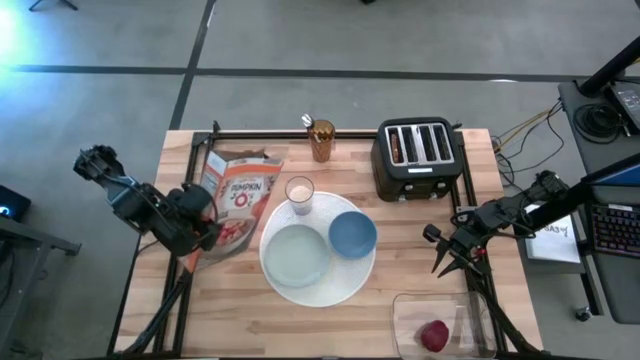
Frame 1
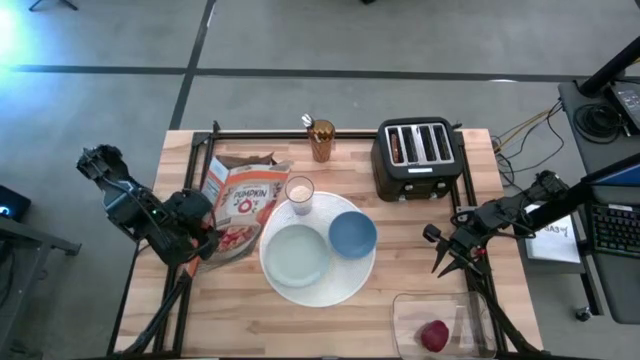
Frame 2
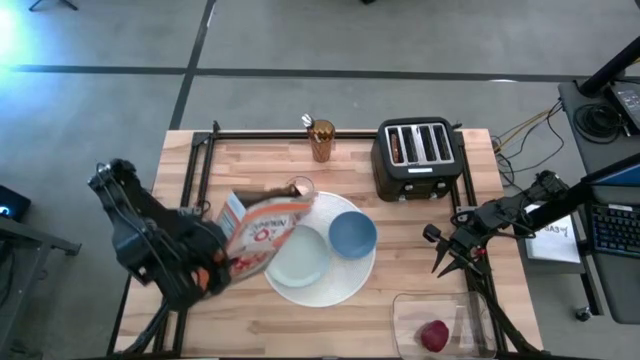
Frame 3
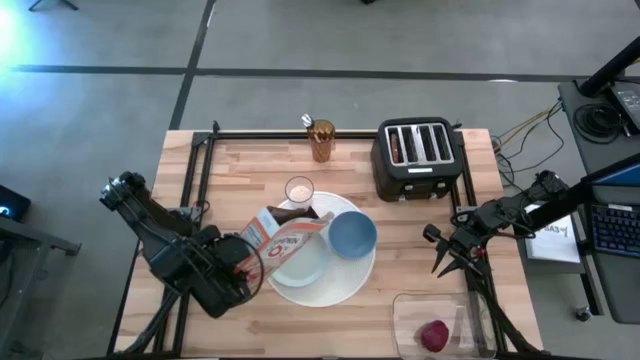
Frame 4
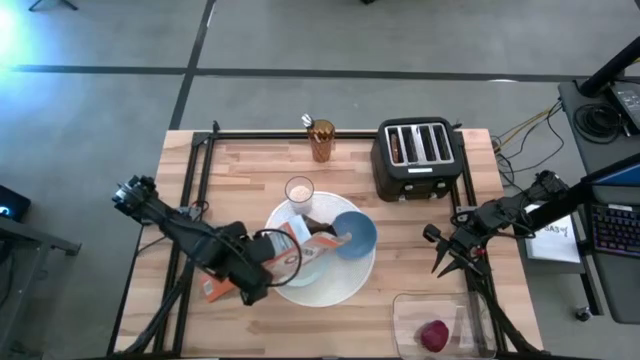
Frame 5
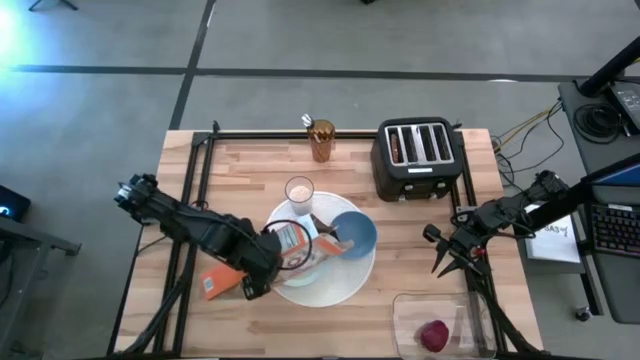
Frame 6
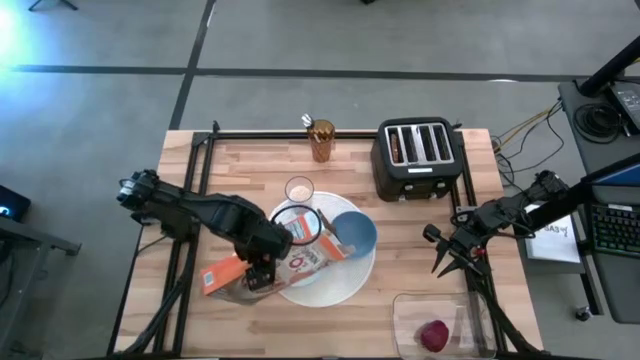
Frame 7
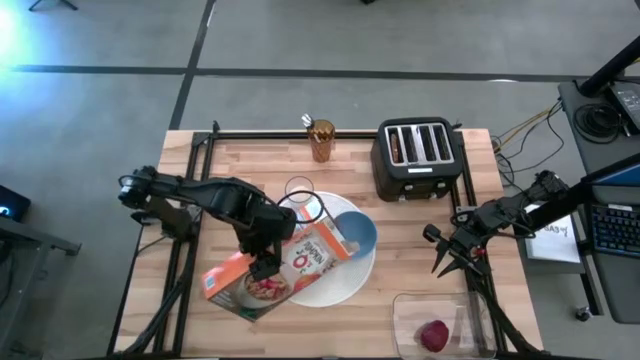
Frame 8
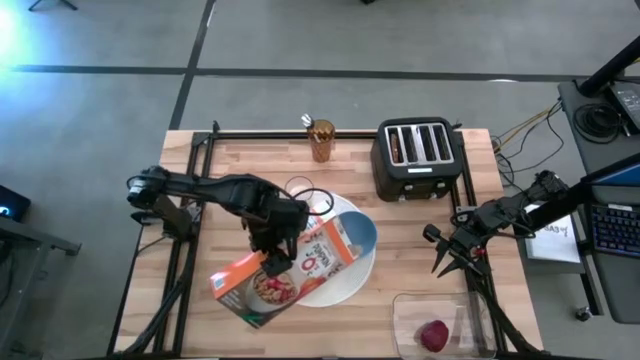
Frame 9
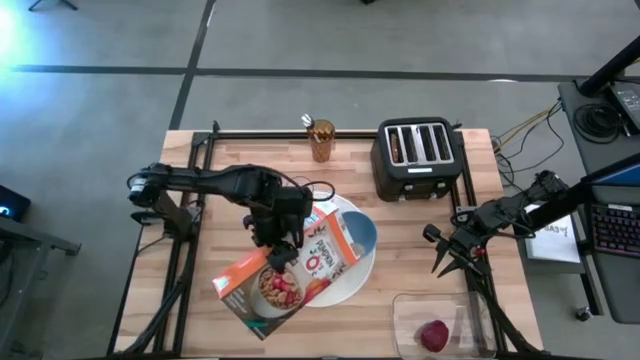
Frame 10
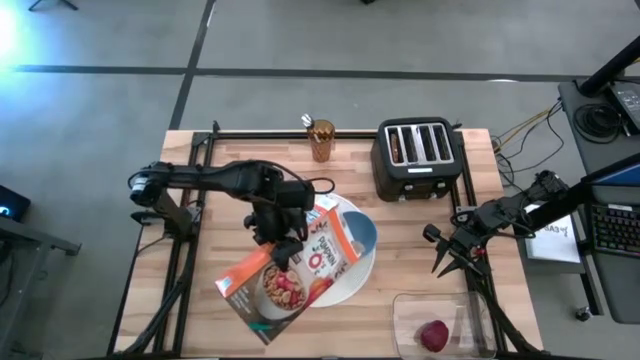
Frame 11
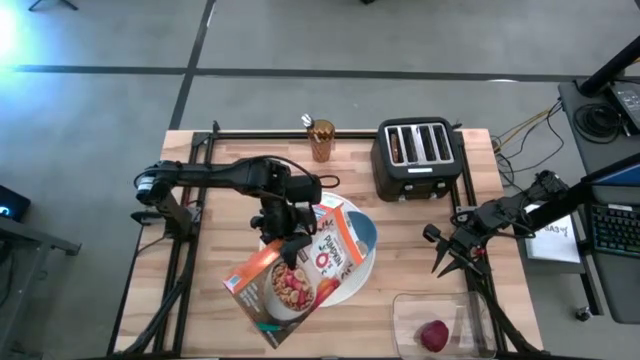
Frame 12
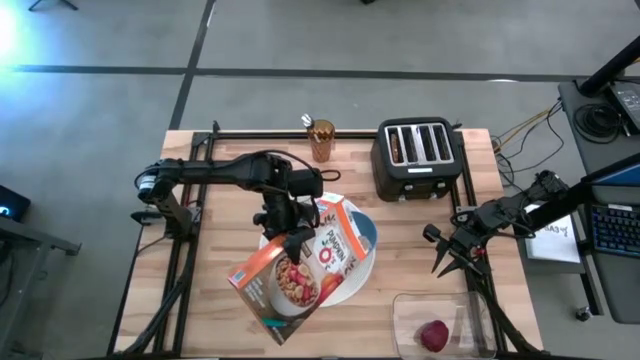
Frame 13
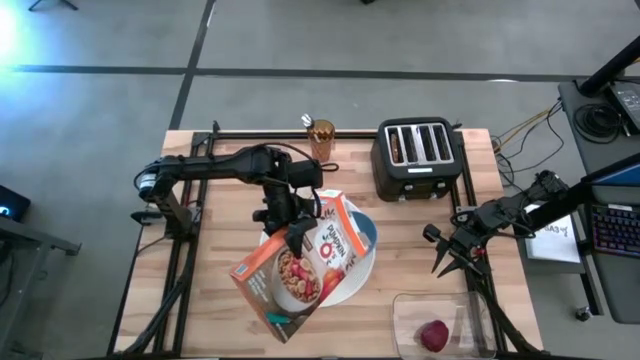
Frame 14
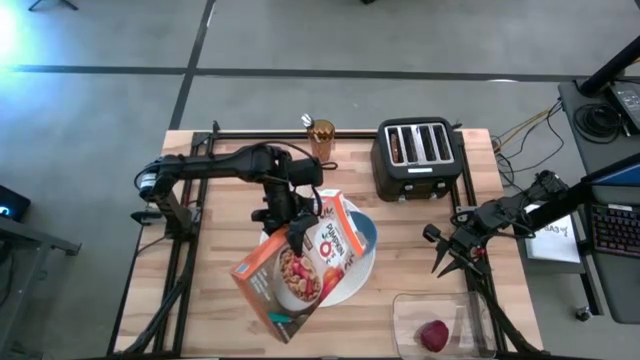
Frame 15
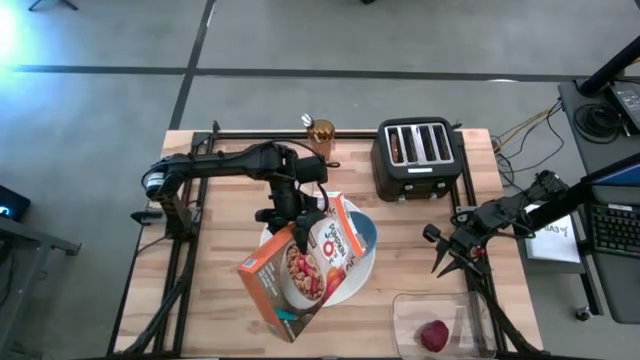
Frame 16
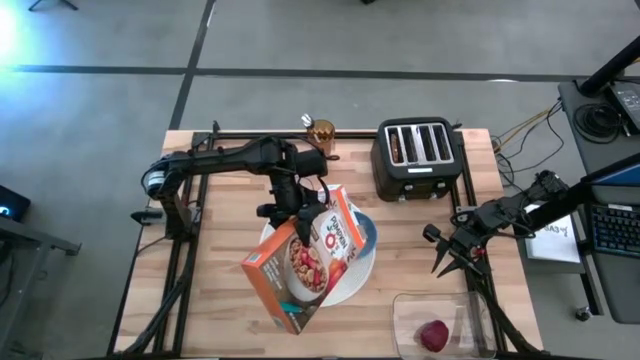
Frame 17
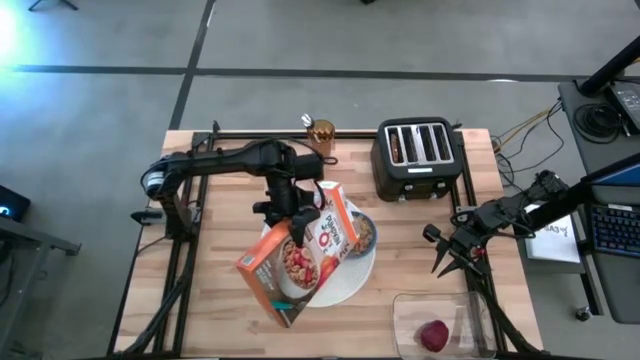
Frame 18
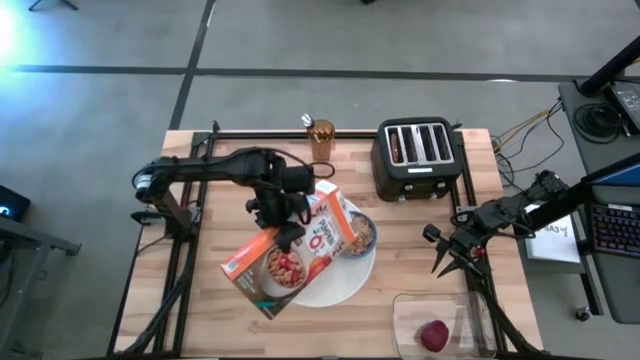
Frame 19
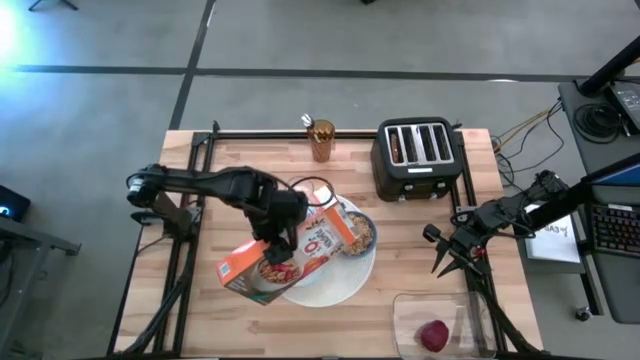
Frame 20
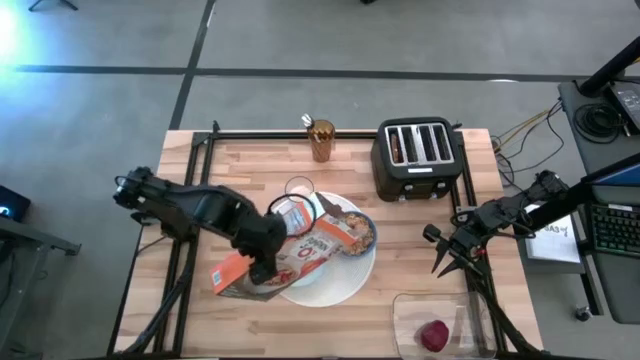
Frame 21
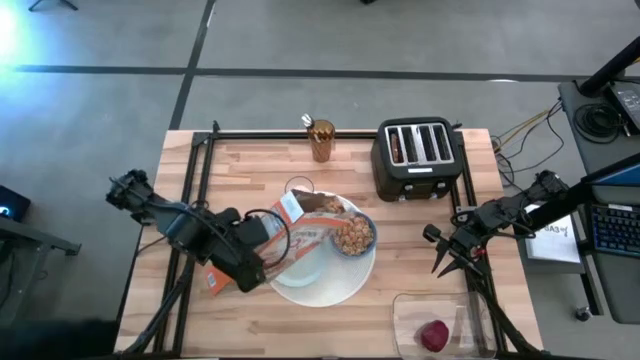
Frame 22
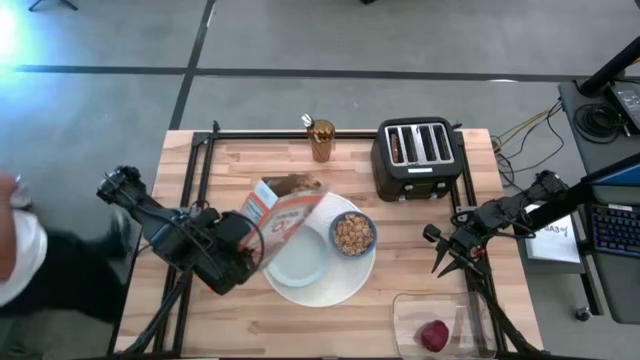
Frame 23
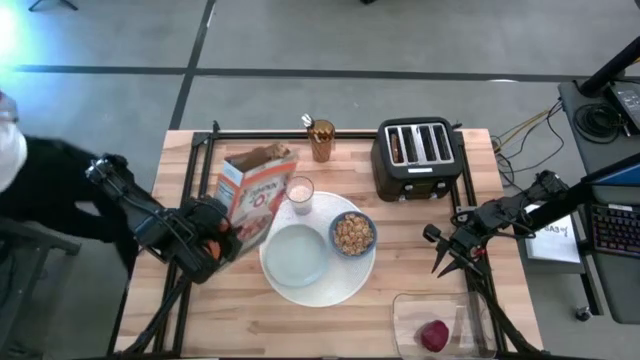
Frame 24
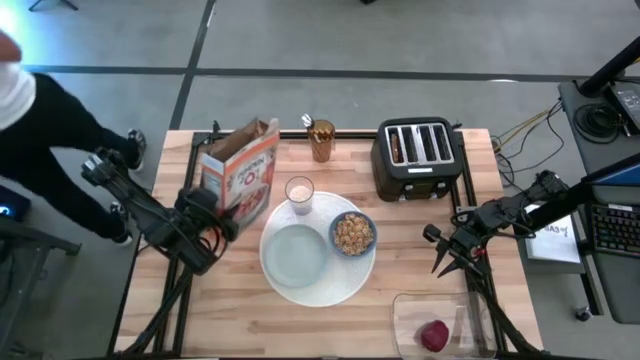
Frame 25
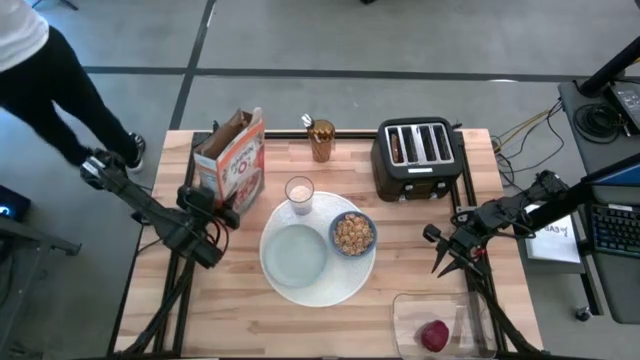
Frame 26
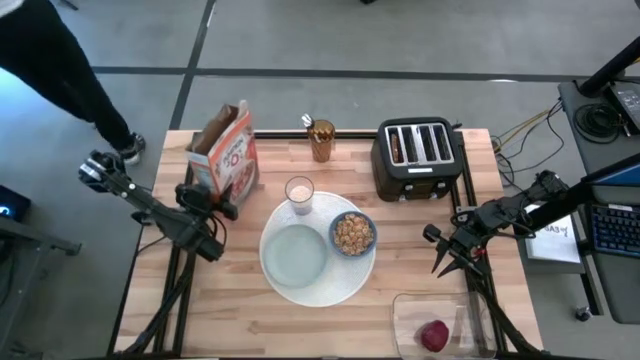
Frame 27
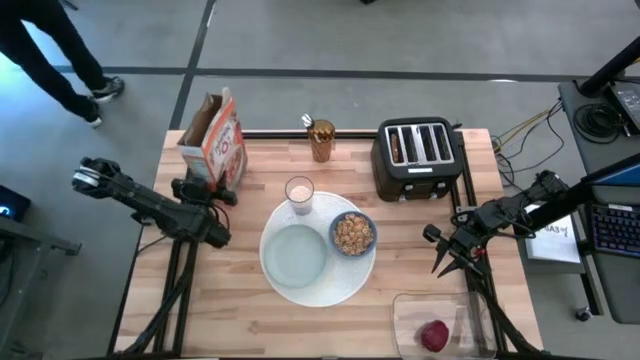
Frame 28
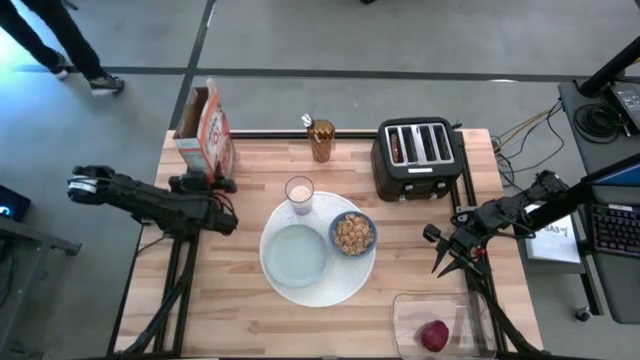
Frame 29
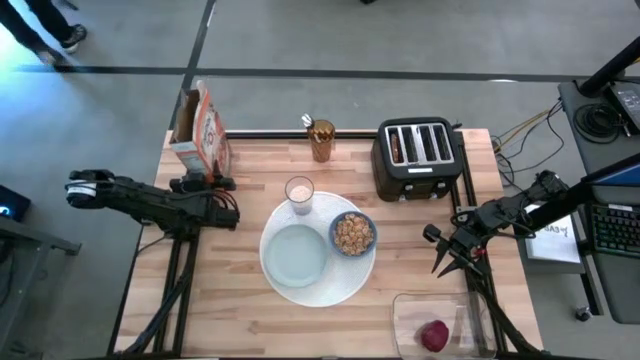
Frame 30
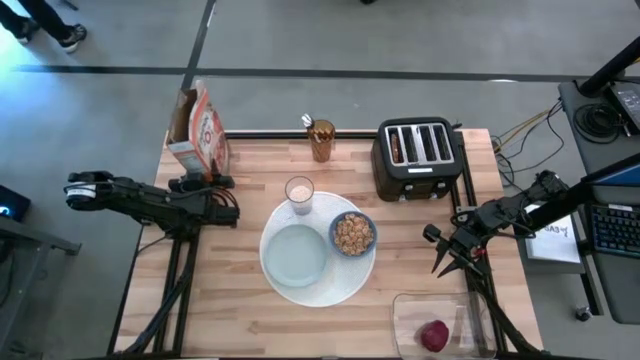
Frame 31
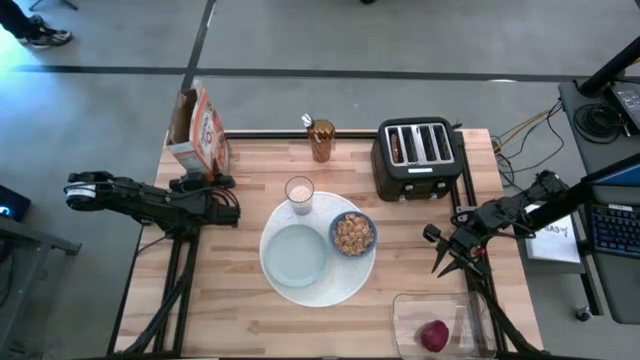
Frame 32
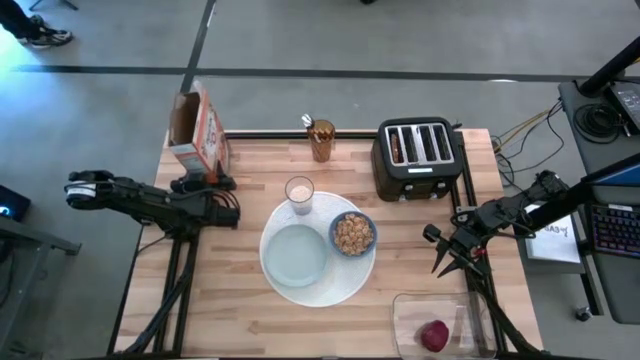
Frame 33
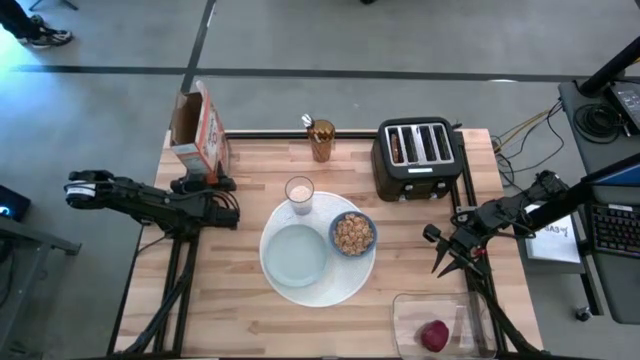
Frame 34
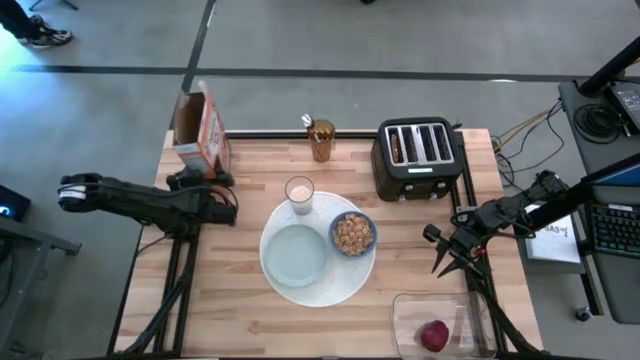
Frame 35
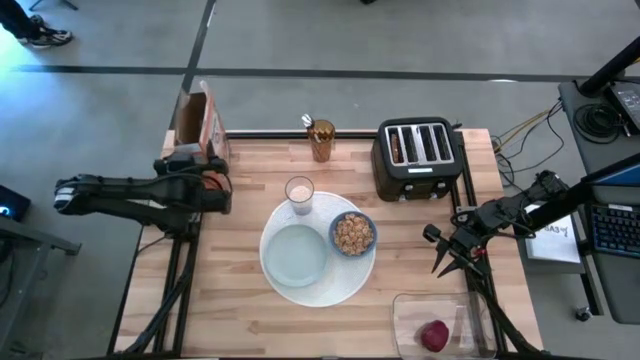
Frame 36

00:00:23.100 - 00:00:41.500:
Task: Arrange a breakfast setting
Pour the cereal into the bowl

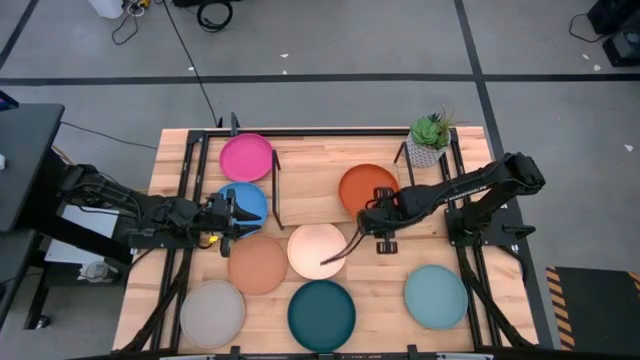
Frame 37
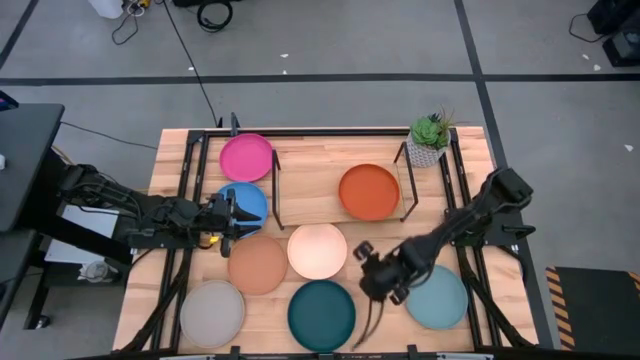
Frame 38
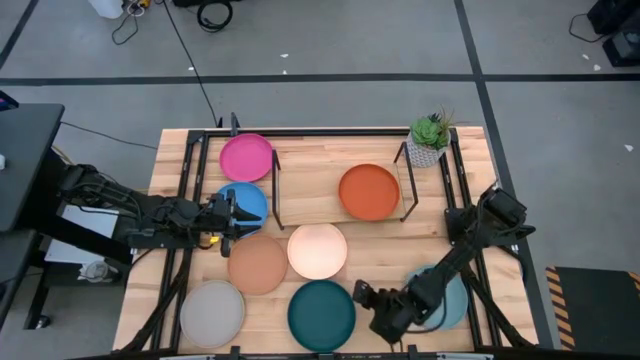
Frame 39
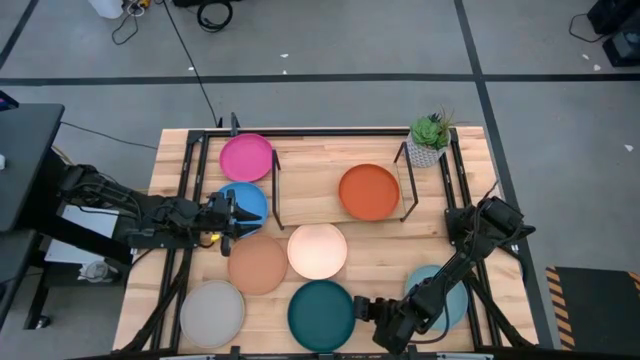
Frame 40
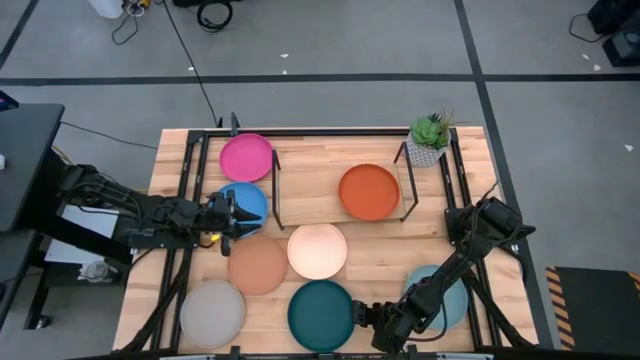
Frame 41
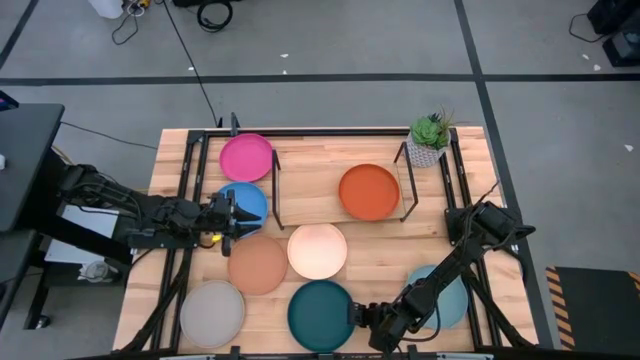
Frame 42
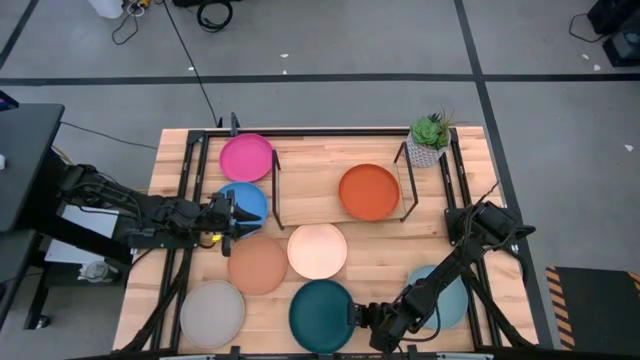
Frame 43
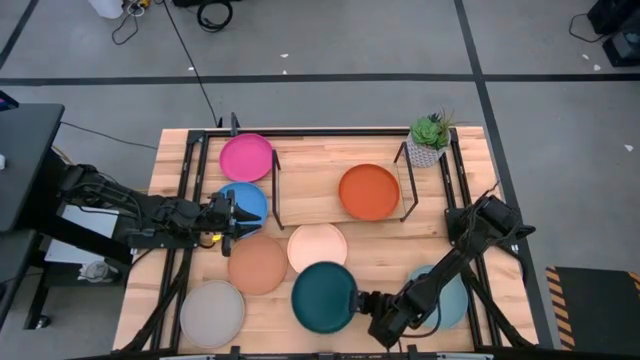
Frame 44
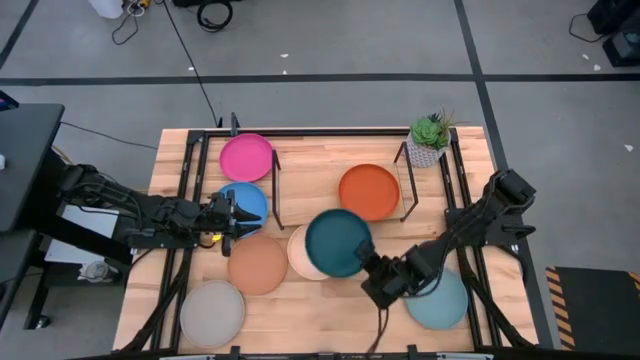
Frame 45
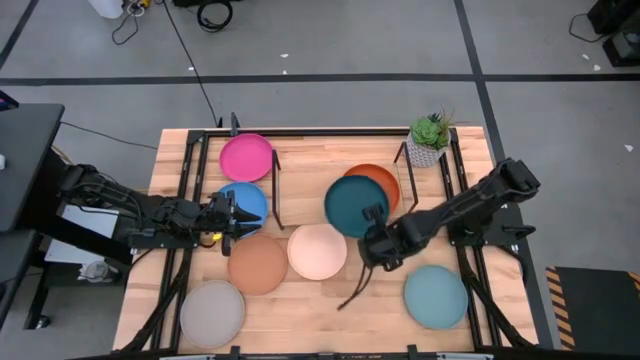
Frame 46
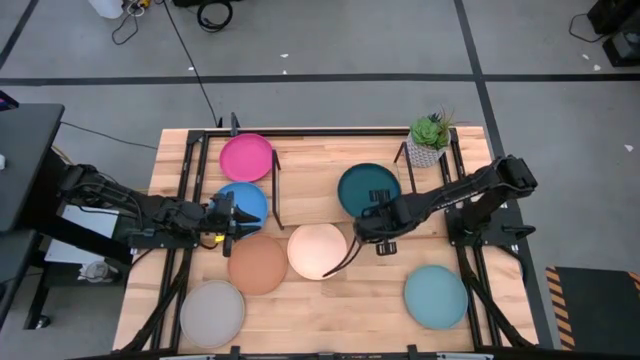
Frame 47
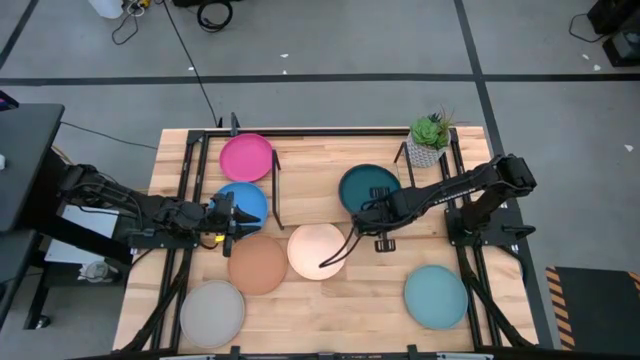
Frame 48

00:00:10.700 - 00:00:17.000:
Task: Place and stack plates onto a shelf
Stack the dark green plate on top of the orange plate on the shelf
